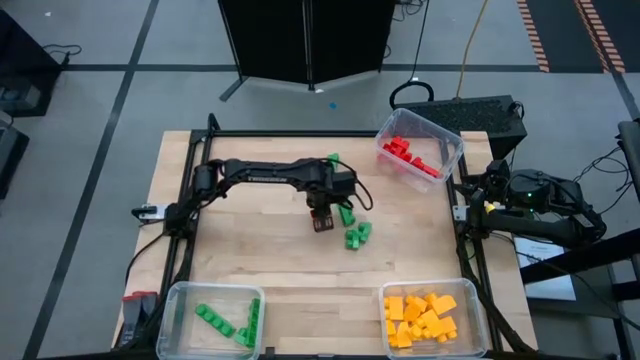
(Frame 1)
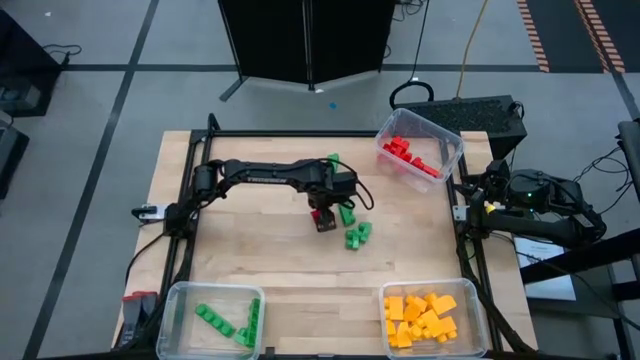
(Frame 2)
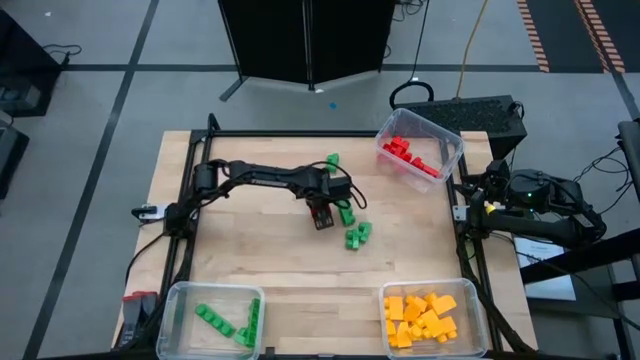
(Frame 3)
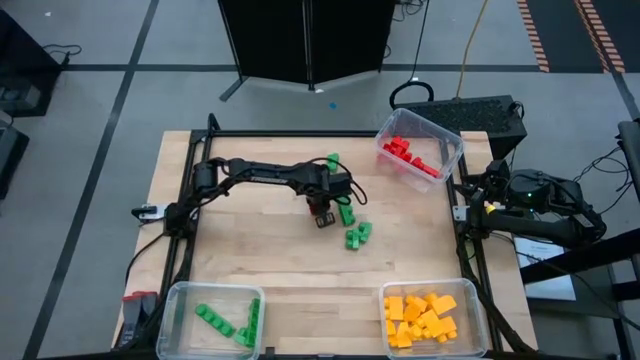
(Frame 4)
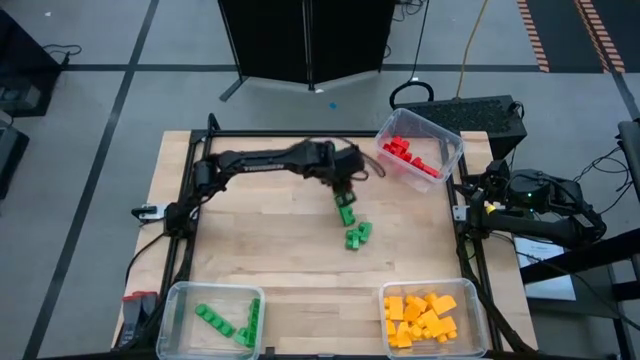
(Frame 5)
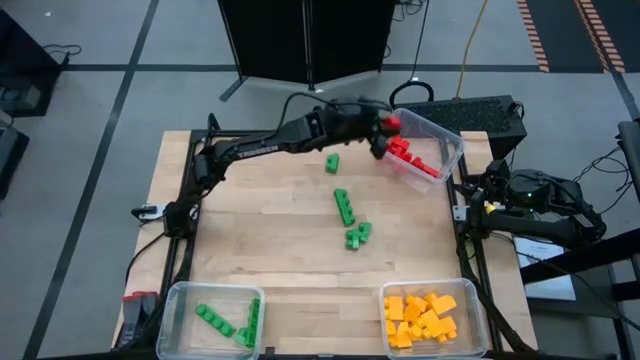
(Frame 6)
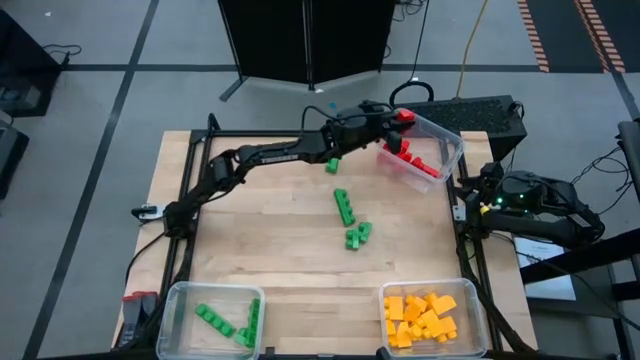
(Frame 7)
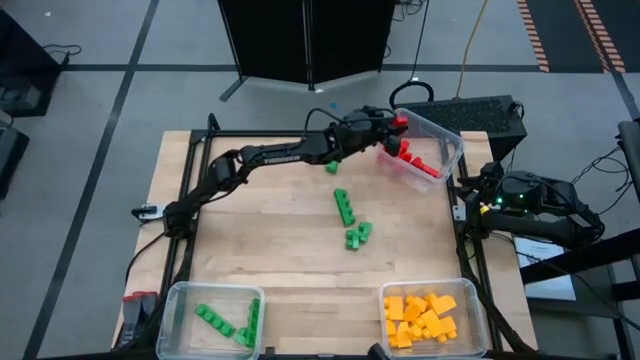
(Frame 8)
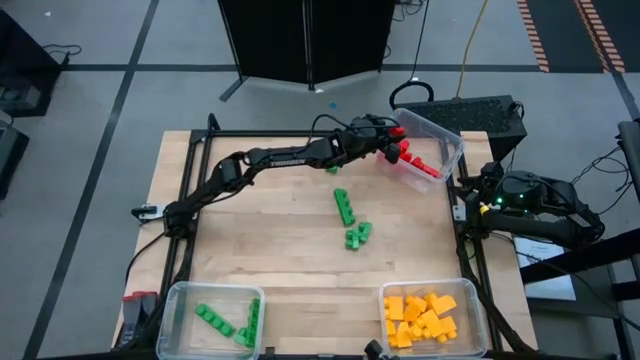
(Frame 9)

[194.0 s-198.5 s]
Task: Sort blocks
Put the red game piece into the top transparent bin

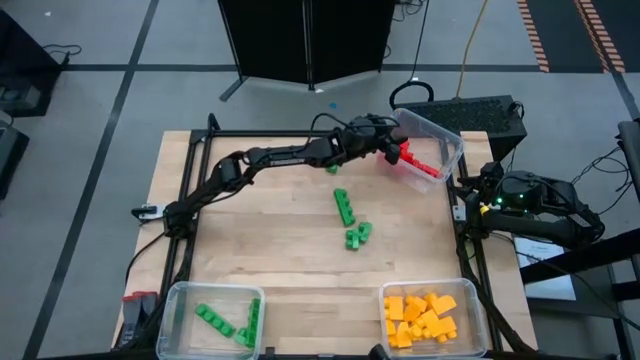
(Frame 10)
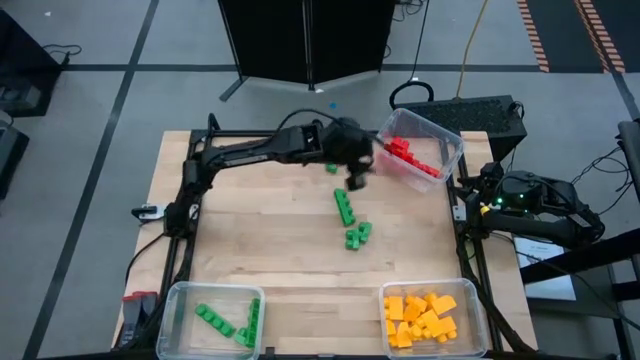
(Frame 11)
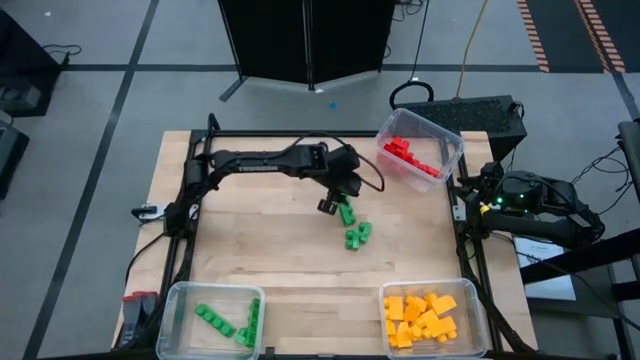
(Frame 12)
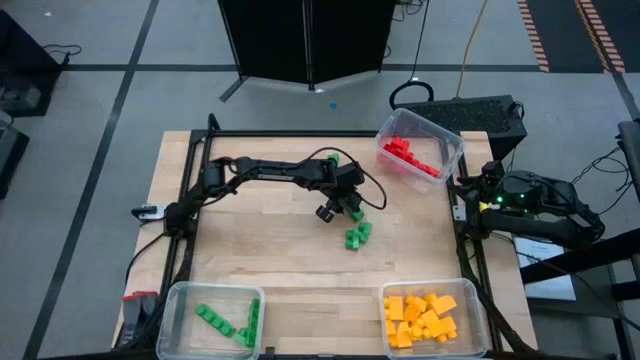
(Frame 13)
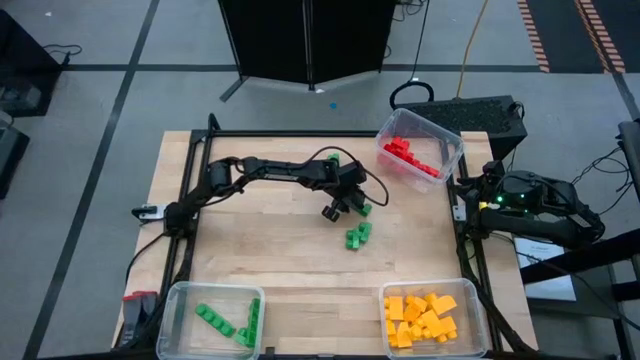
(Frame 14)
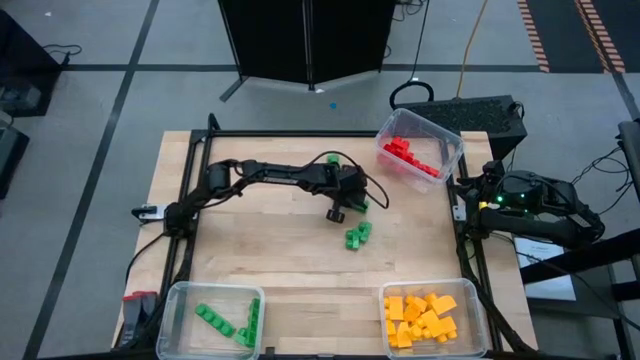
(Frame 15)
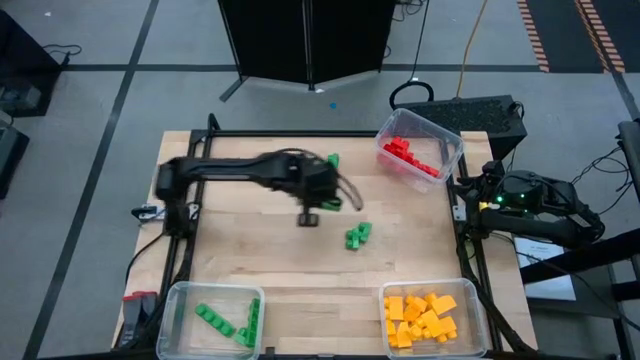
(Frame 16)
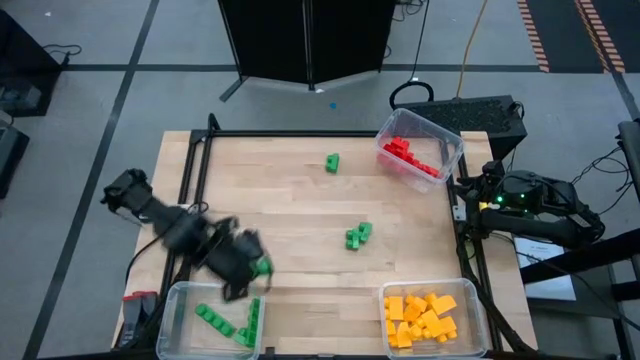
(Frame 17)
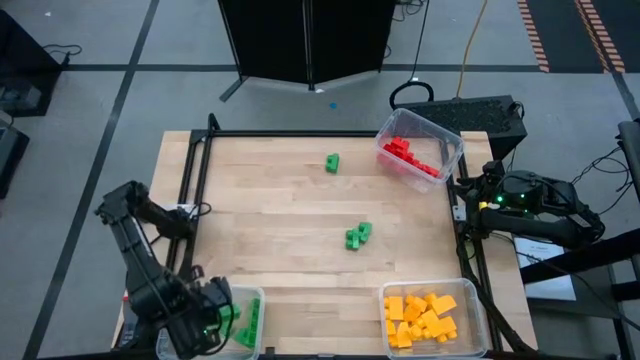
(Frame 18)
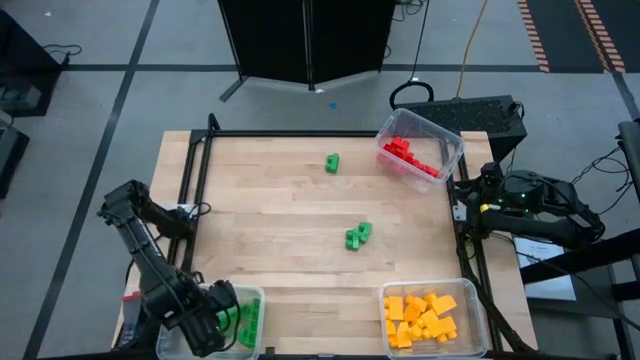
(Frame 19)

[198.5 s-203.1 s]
Put the green game piece into the bottom left transparent bin

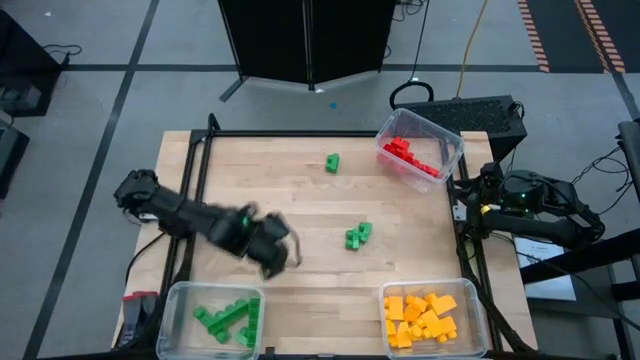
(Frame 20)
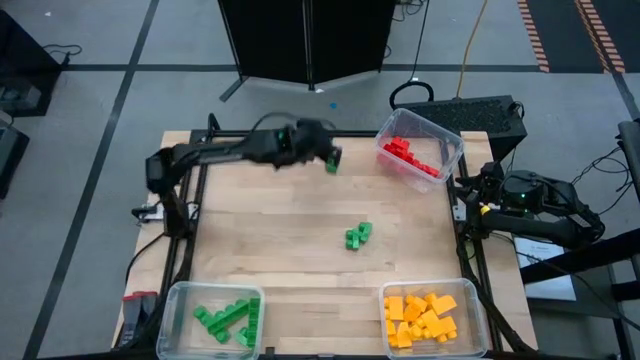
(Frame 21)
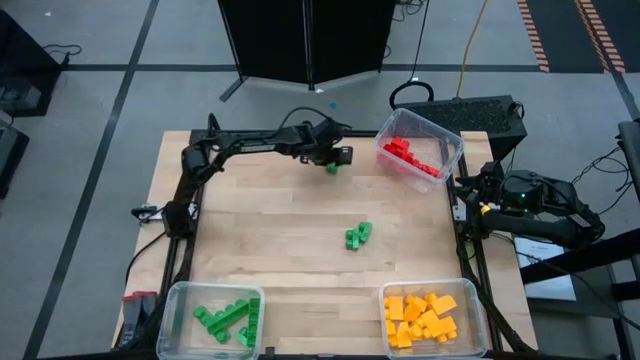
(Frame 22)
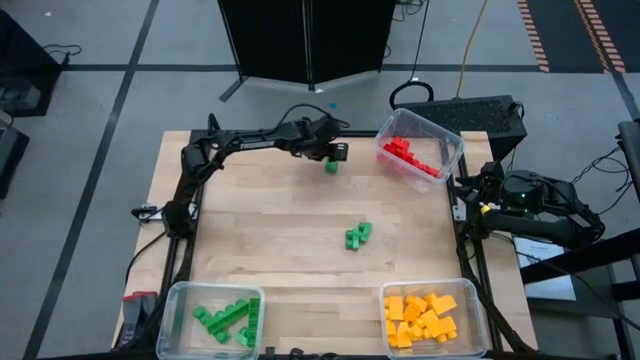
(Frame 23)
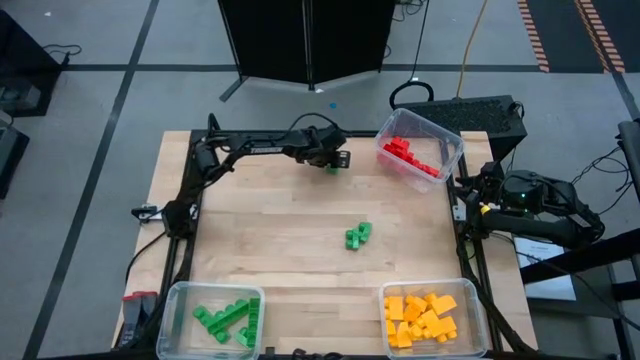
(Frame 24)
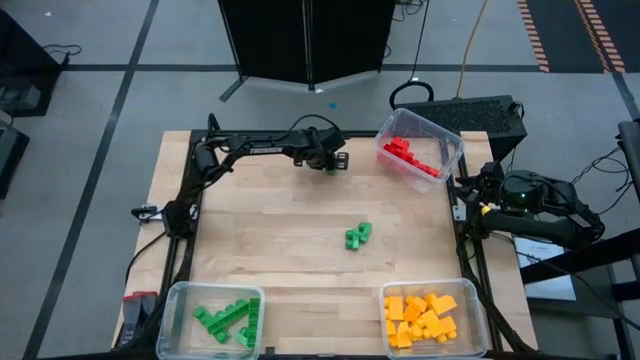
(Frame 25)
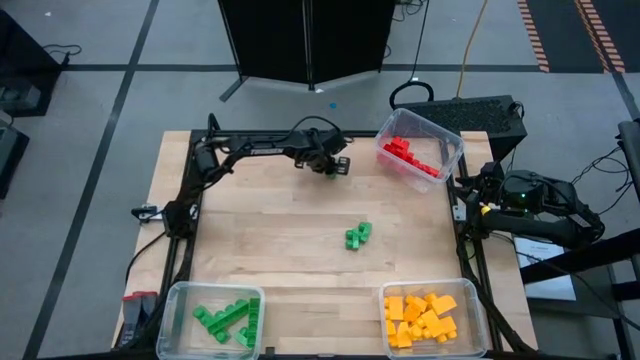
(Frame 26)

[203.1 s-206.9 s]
Put the green game piece into the bottom left transparent bin

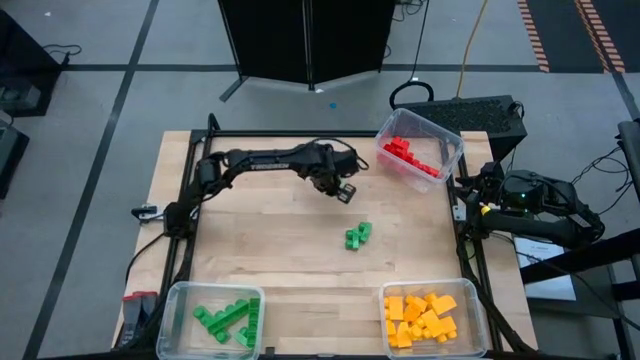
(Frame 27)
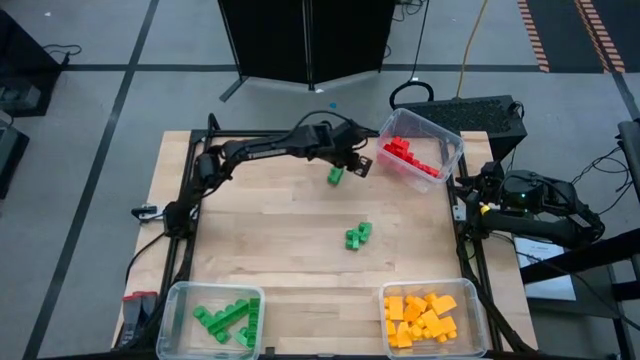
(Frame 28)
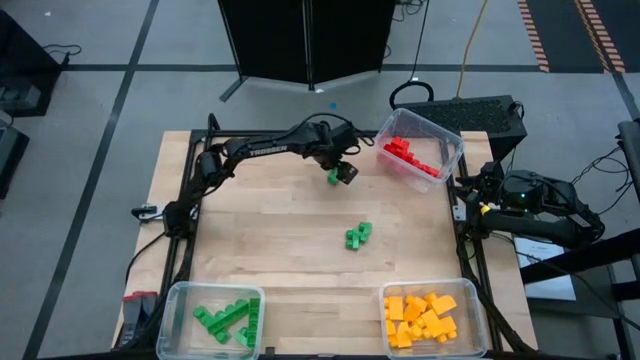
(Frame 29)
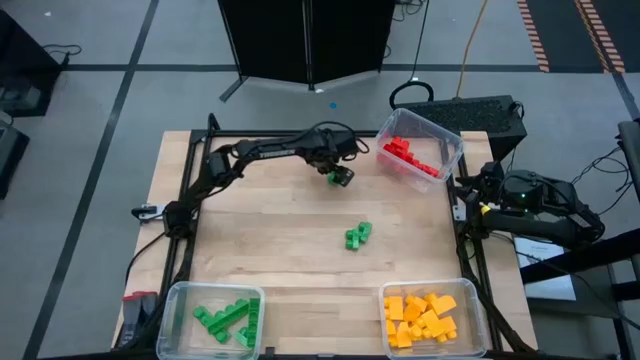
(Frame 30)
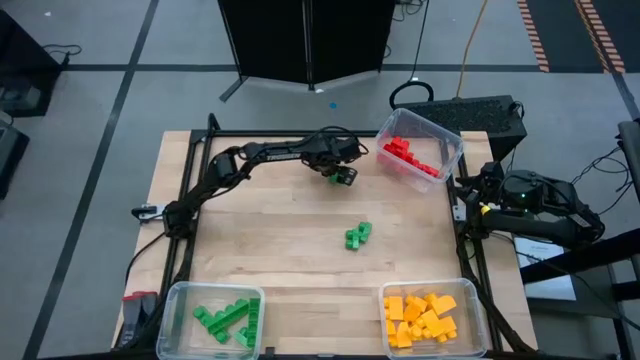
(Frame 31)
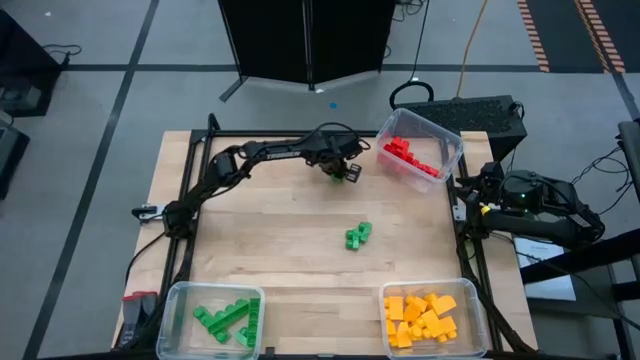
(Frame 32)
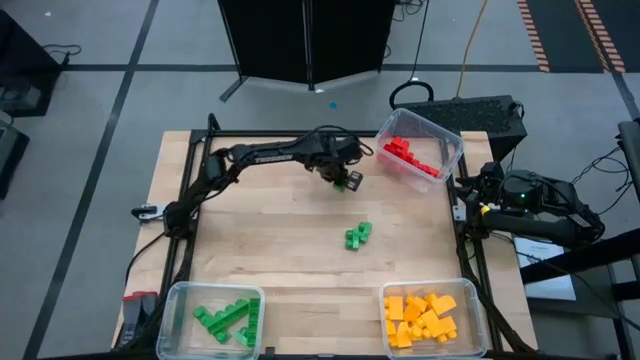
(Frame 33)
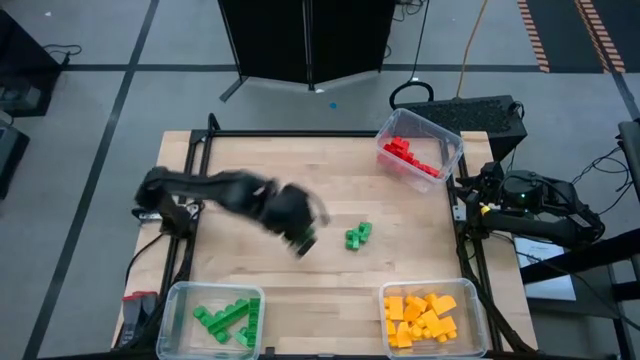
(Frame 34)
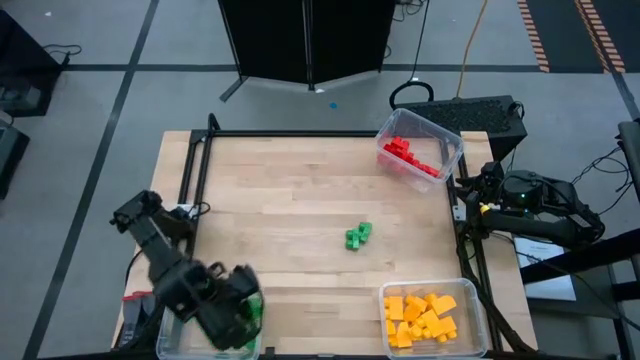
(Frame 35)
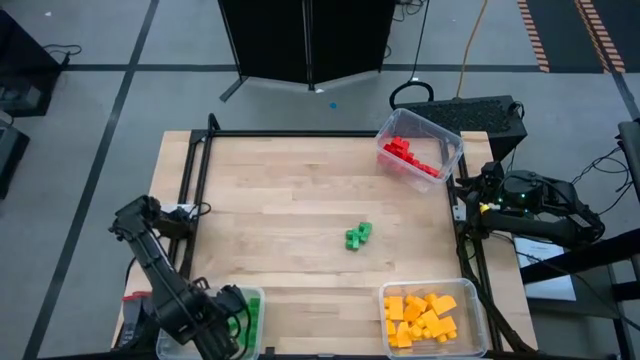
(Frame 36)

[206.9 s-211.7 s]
Put the green game piece into the bottom left transparent bin

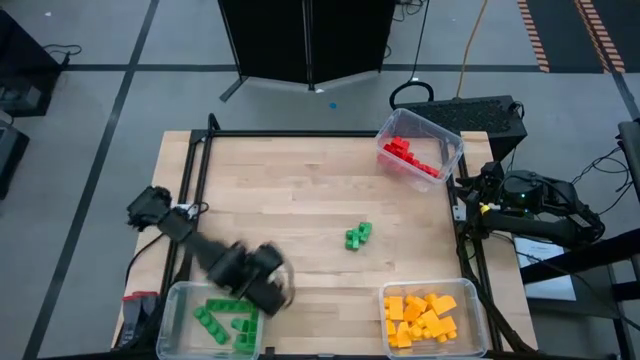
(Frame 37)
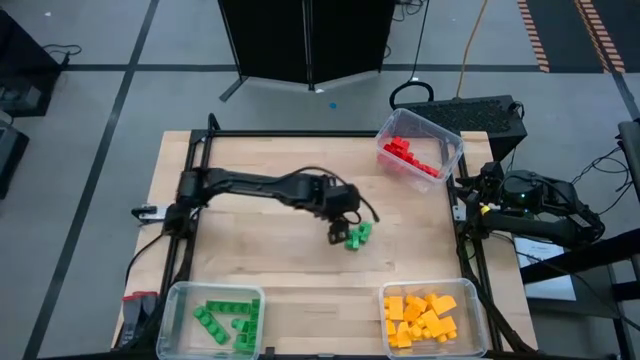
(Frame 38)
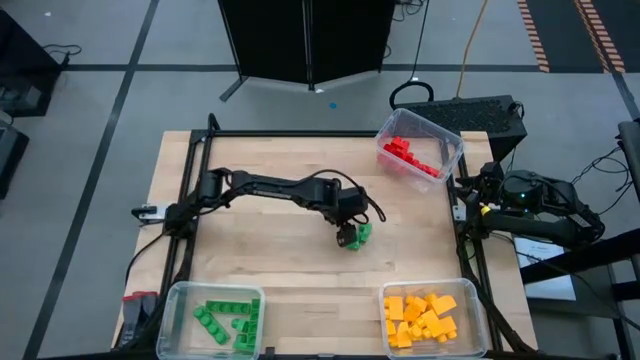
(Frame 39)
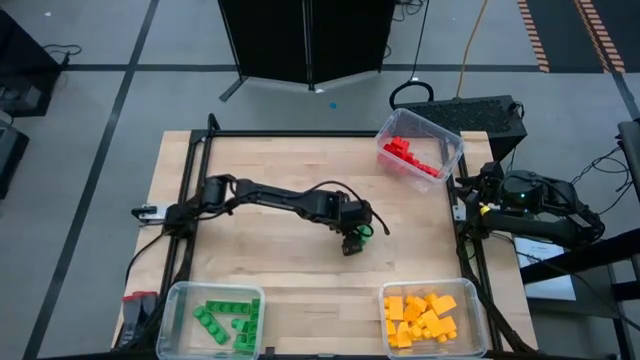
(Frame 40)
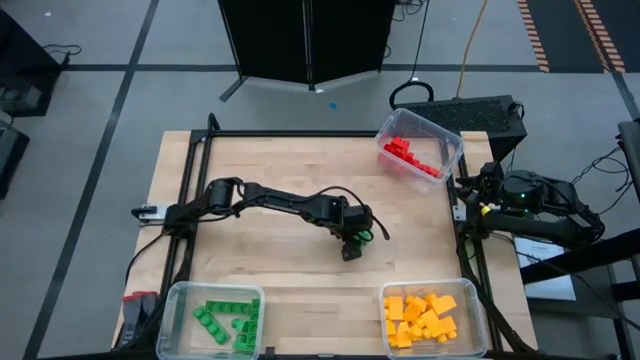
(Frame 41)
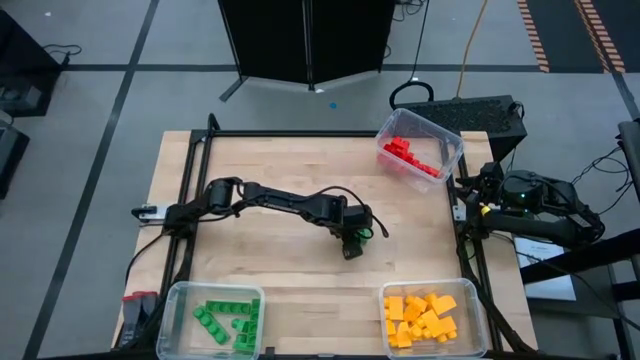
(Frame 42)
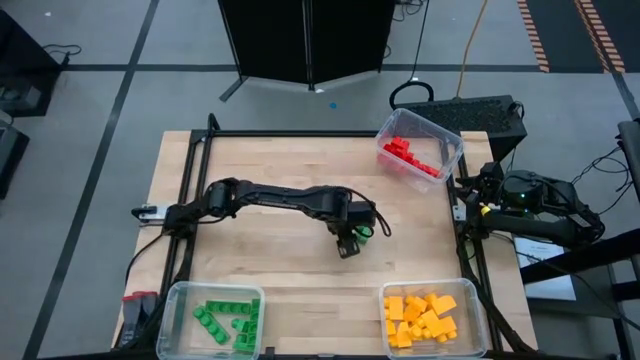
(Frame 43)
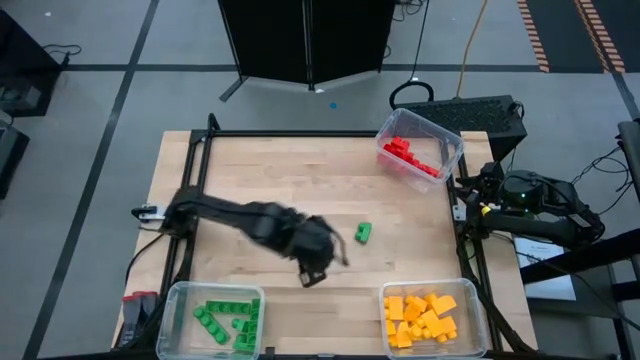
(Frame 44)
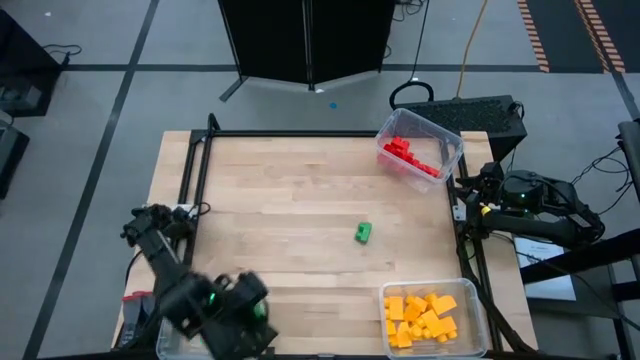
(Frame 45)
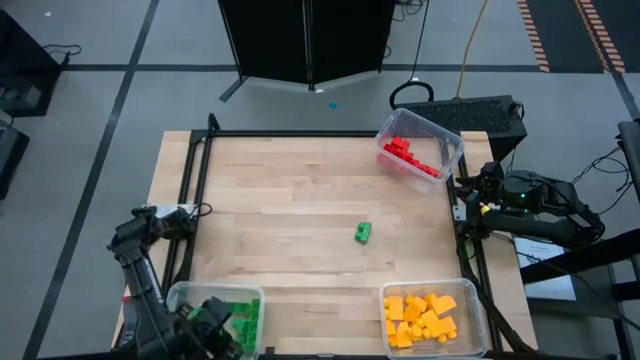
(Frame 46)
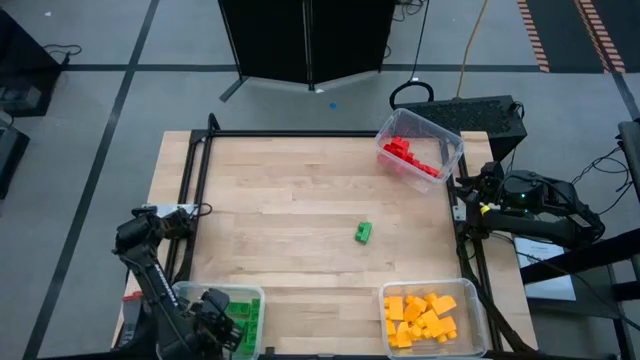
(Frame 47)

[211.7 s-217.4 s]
Put the green game piece into the bottom left transparent bin
